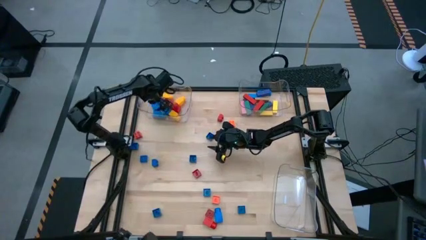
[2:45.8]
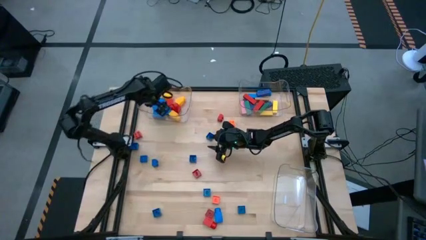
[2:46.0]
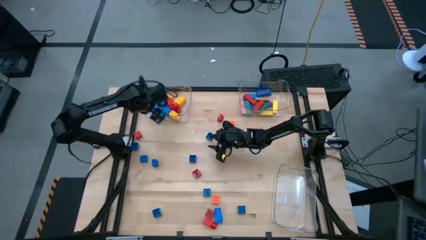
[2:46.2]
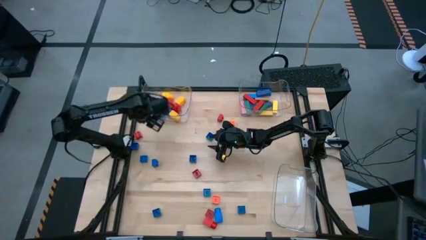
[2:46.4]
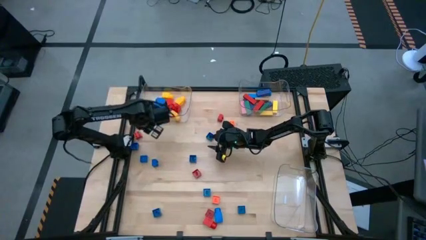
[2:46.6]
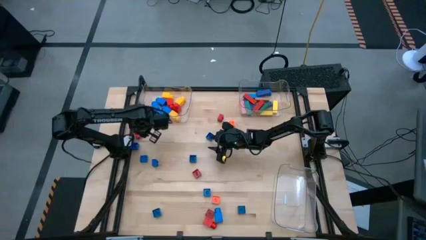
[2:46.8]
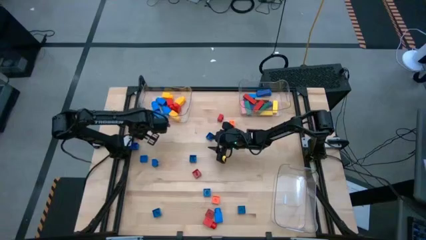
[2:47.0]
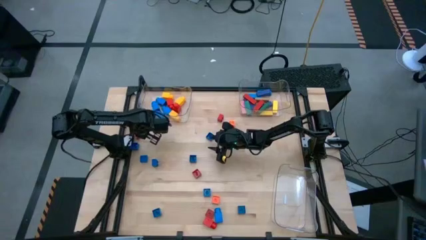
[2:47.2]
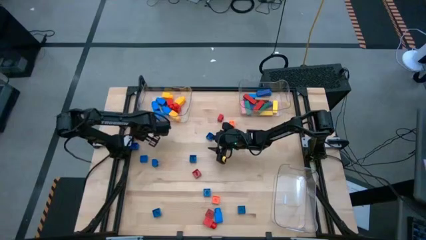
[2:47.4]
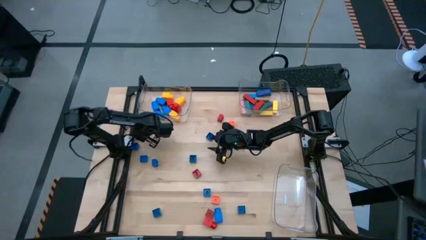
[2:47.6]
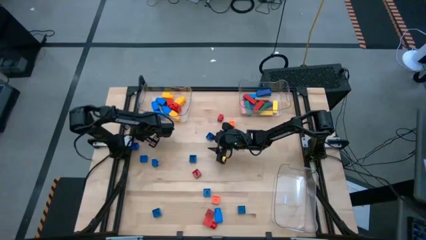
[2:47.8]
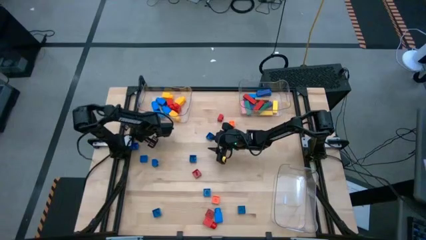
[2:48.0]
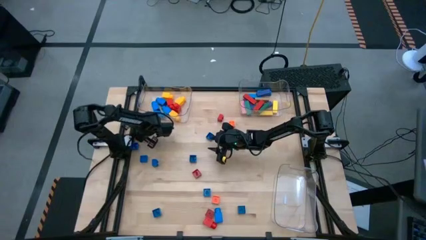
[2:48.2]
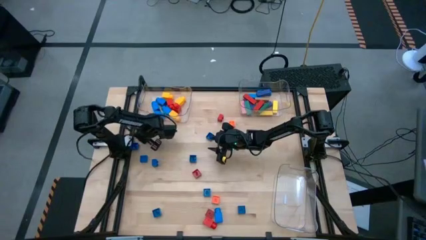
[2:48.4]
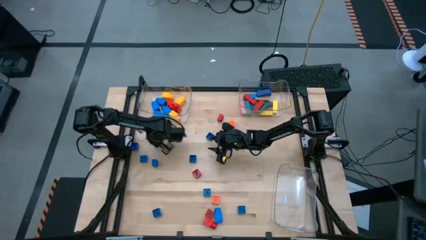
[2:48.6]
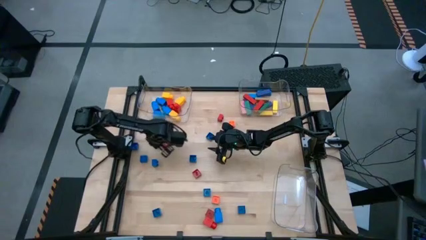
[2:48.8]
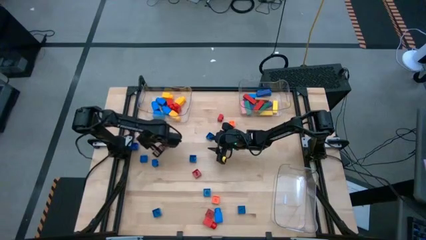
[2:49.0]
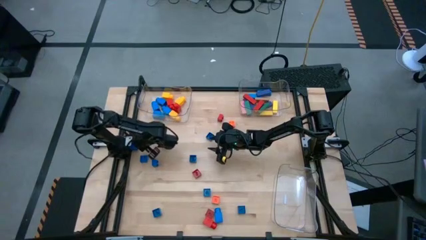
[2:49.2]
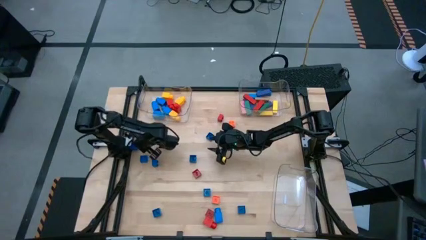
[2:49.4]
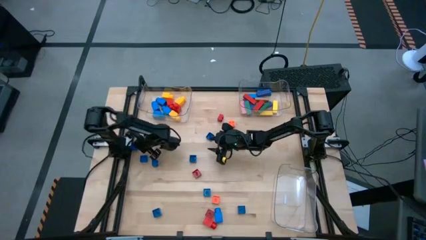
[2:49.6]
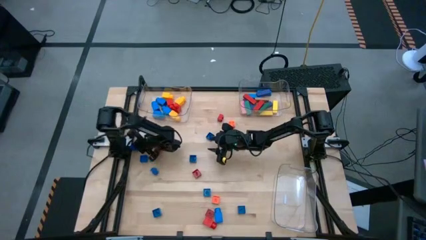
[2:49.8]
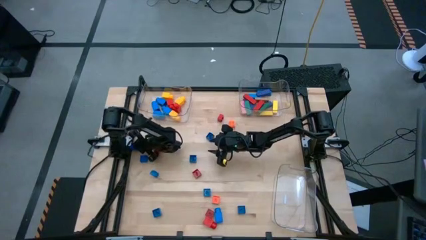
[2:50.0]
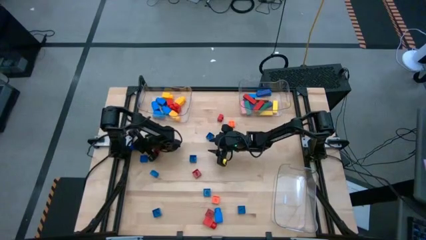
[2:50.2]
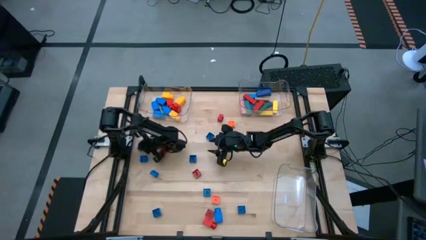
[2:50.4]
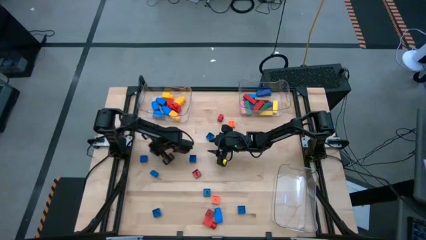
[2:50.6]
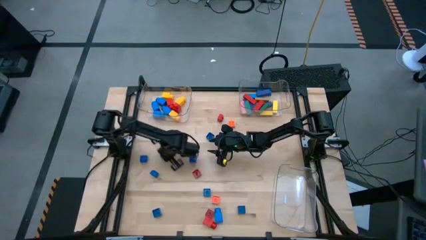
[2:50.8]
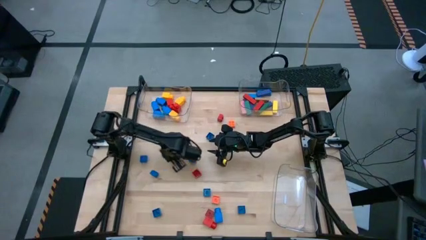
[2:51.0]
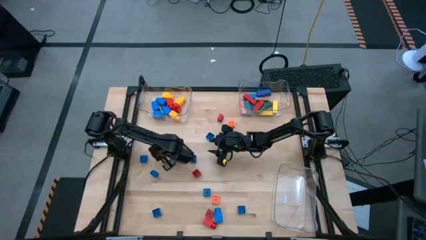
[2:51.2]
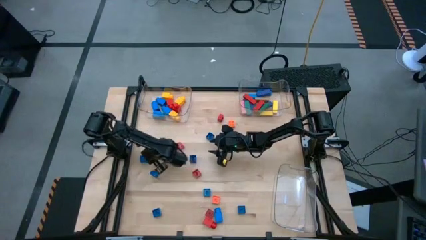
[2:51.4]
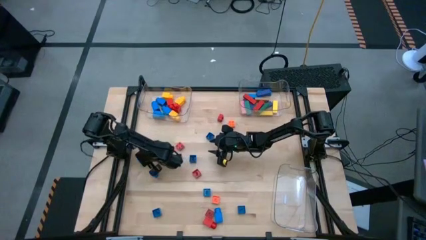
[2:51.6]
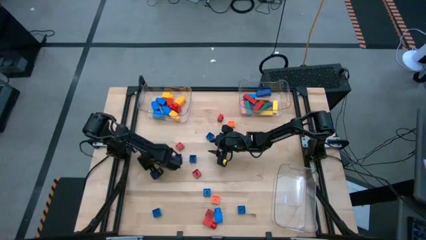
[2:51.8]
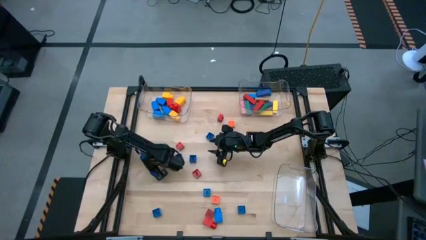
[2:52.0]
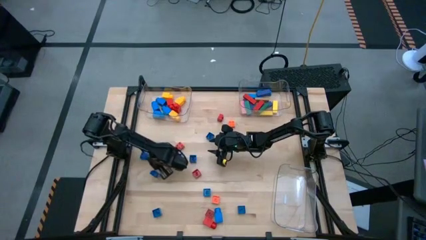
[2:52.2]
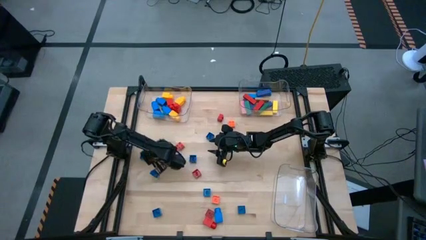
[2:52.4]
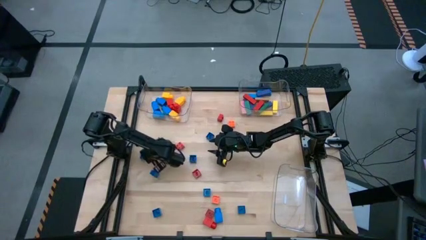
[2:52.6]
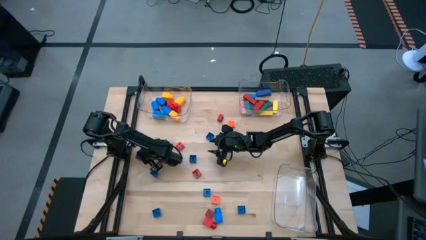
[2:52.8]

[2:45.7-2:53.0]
Task: Sort blocks by size
Move the game pieces to the center of the table

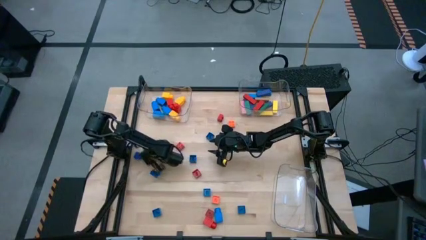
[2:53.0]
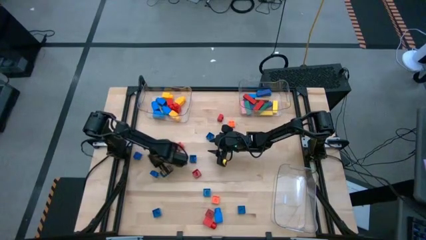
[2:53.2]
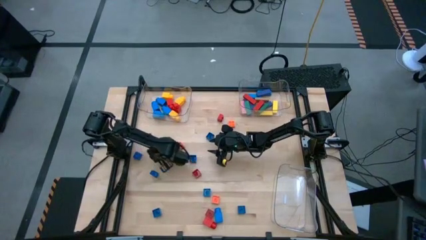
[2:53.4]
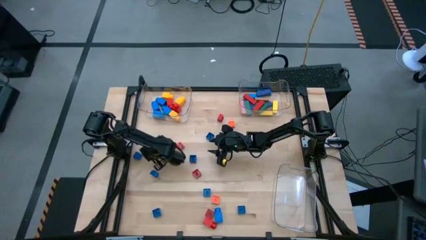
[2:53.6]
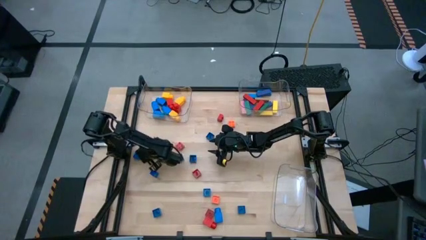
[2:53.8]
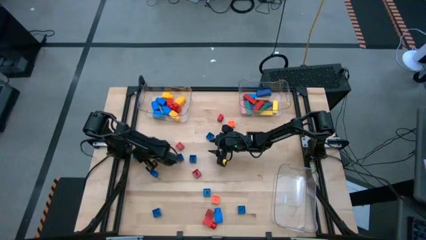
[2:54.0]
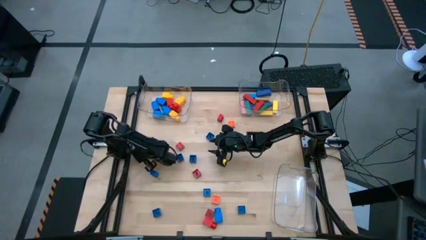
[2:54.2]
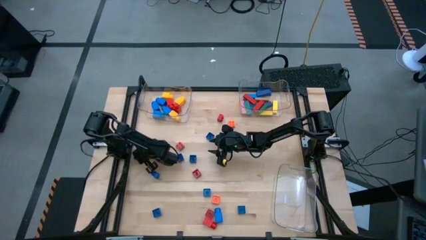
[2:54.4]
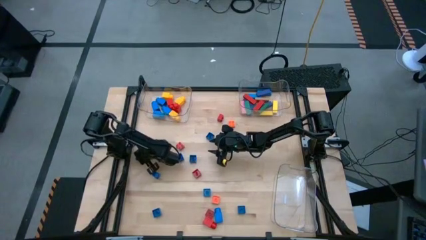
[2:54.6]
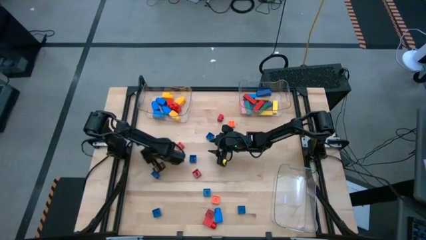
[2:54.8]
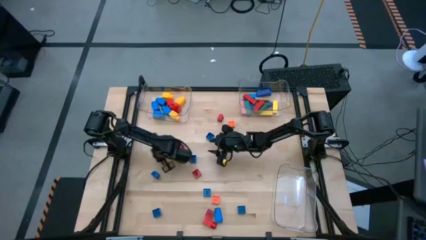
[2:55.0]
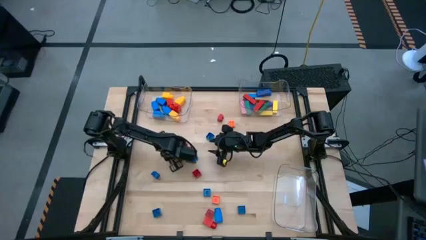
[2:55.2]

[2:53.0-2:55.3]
Move the game pieces to the center of the table

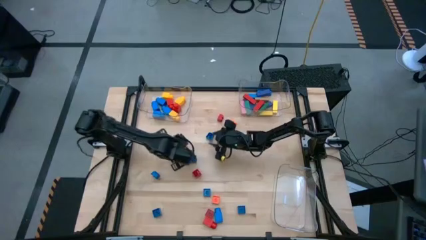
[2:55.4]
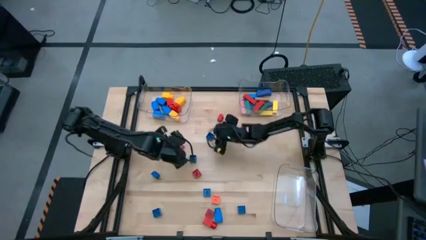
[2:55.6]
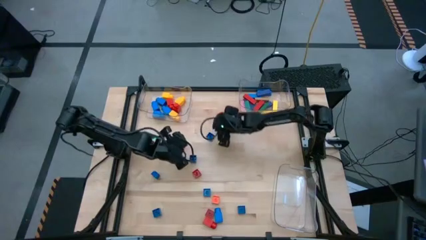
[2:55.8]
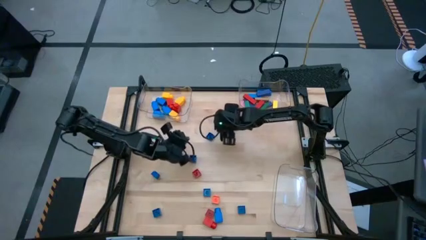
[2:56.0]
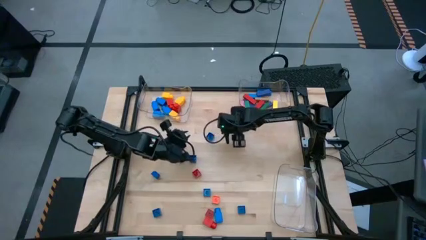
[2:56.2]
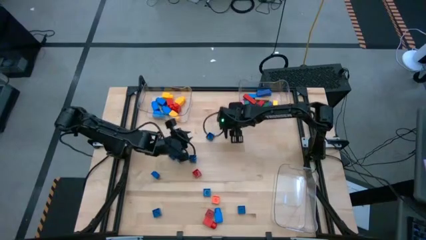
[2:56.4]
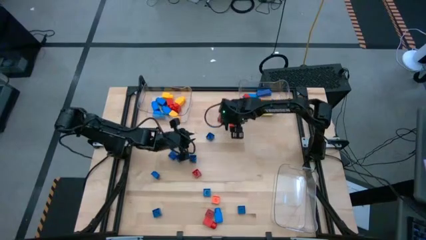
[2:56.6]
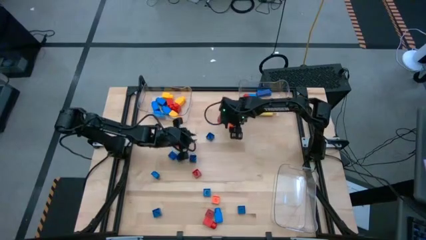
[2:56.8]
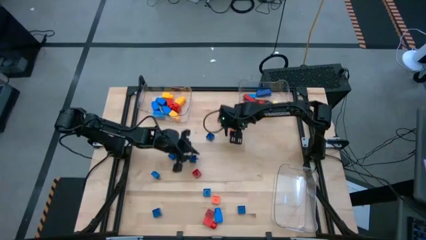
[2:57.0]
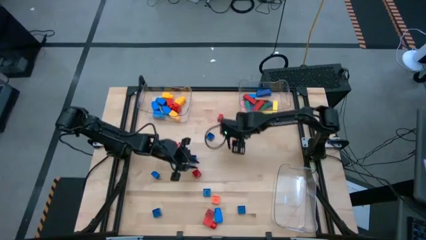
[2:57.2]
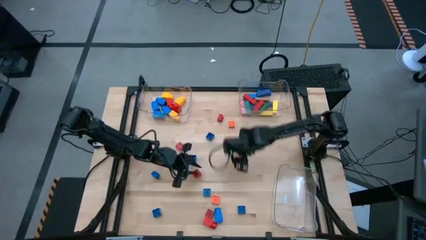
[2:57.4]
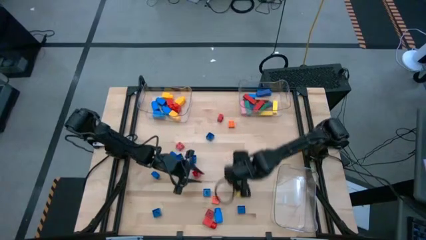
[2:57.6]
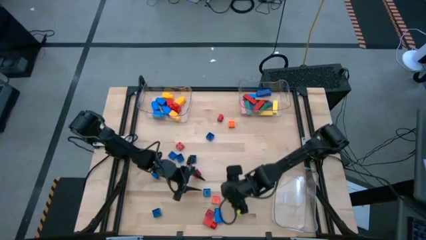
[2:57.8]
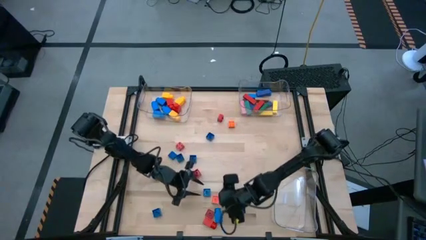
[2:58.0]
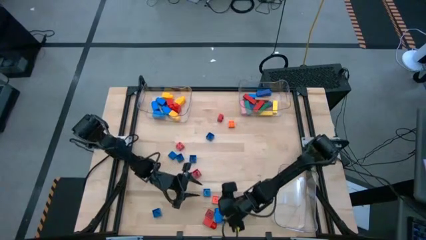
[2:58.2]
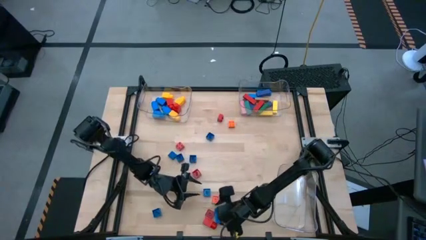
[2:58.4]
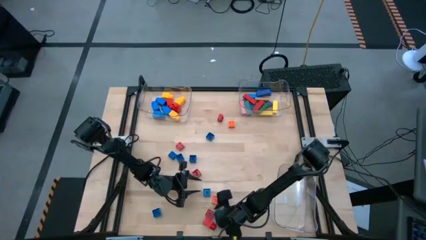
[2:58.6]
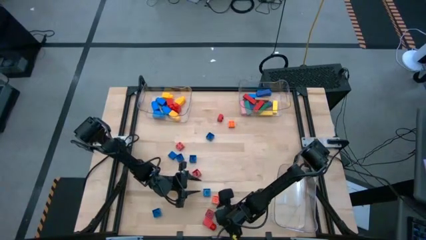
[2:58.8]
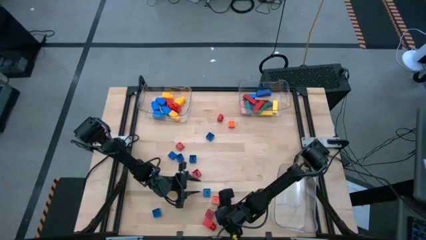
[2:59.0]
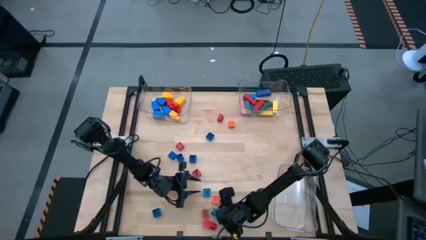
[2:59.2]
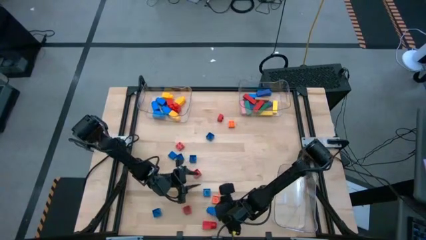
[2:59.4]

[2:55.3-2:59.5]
Put the 1 stud blue game piece into the top left transparent bin

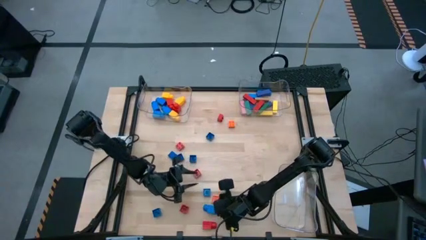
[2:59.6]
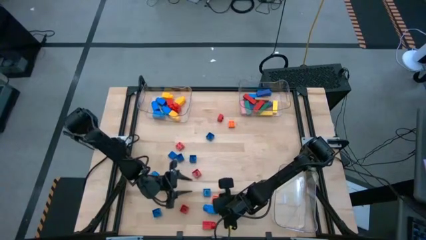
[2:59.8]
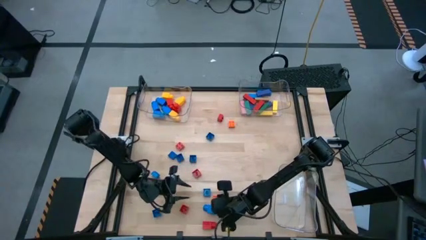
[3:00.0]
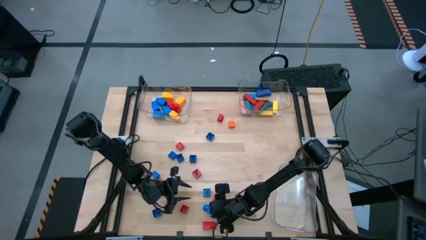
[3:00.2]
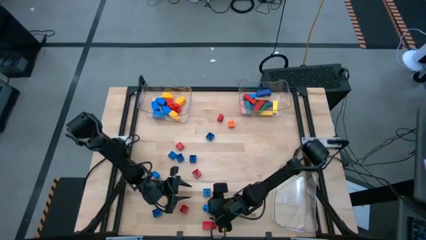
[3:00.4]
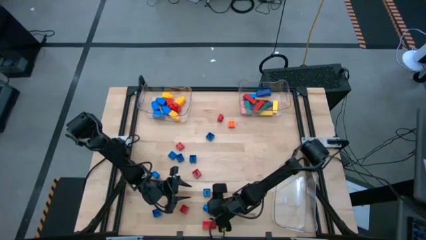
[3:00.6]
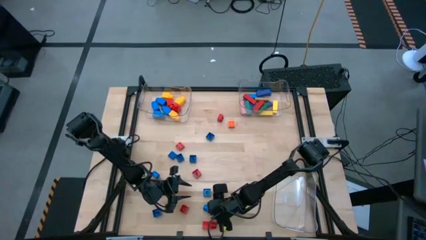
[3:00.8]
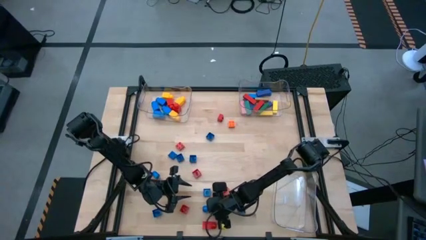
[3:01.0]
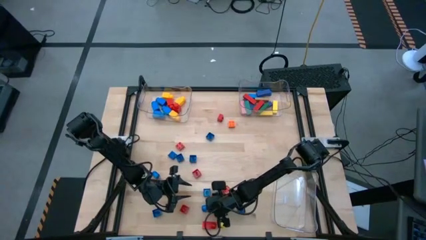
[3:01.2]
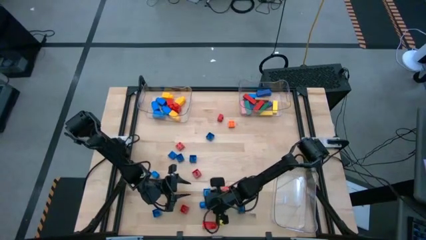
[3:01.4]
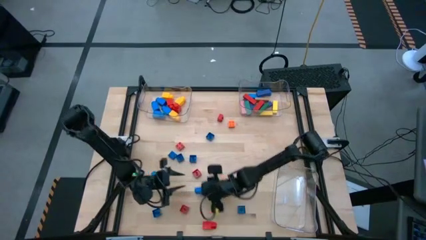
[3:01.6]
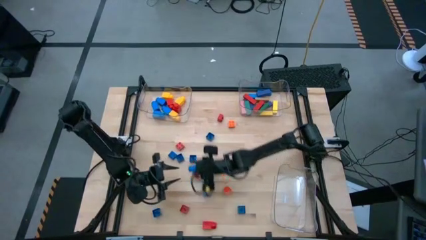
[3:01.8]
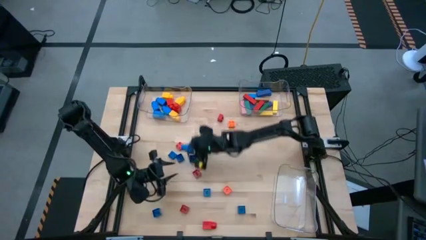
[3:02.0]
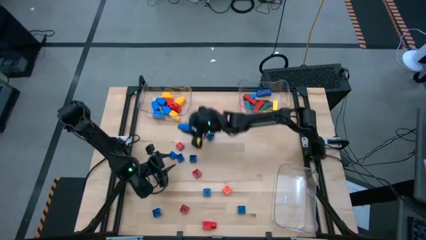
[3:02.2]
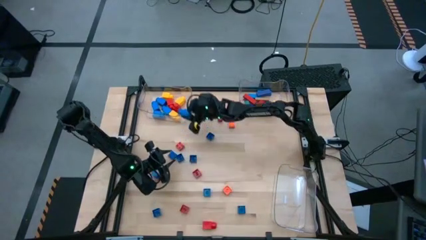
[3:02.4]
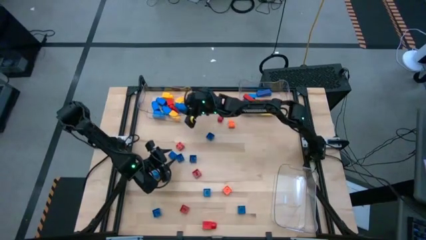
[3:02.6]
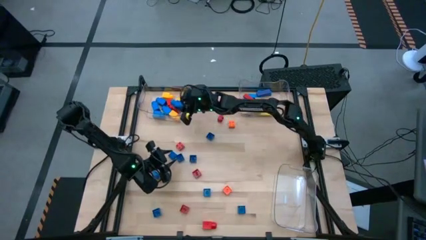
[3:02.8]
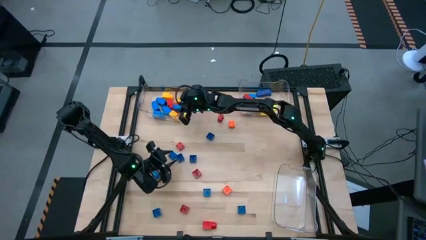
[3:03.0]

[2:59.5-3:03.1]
Put the 1 stud blue game piece into the top left transparent bin
